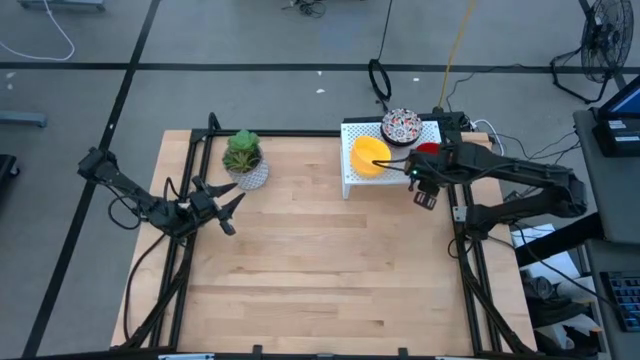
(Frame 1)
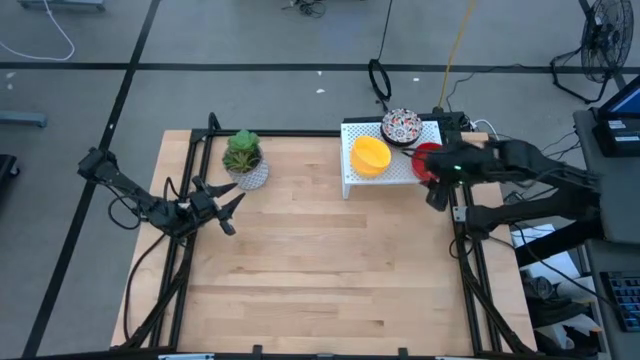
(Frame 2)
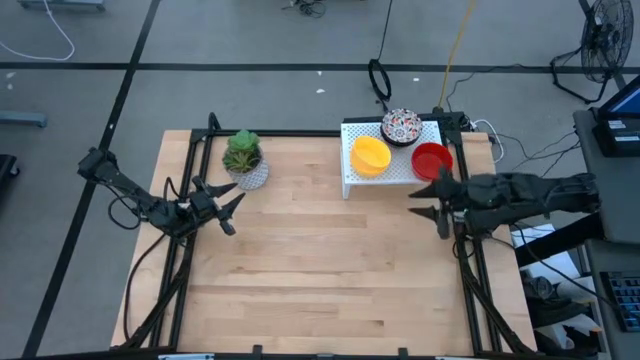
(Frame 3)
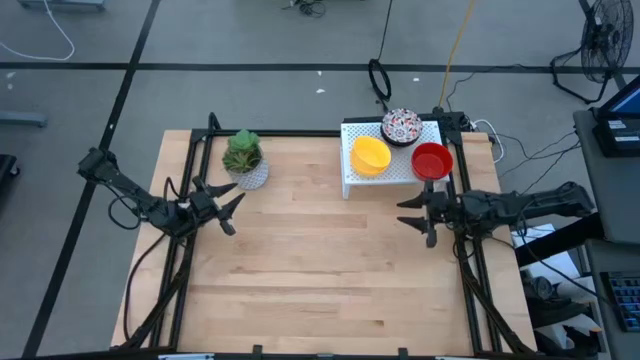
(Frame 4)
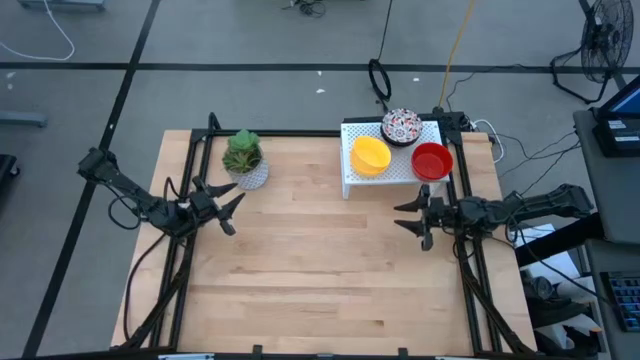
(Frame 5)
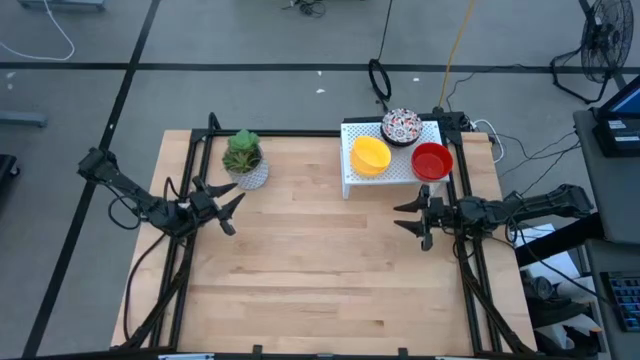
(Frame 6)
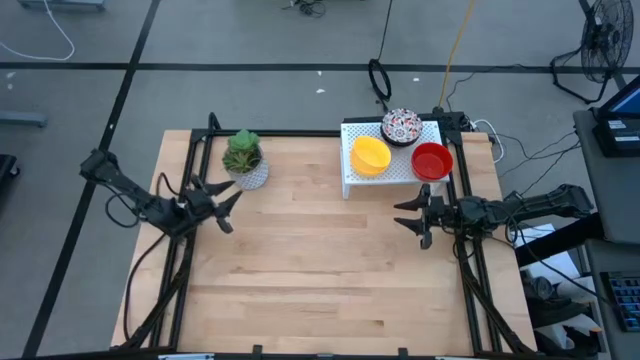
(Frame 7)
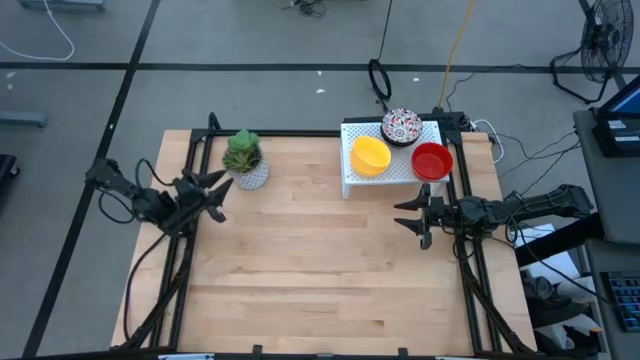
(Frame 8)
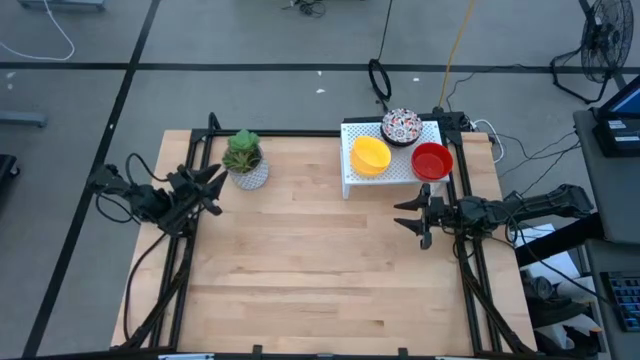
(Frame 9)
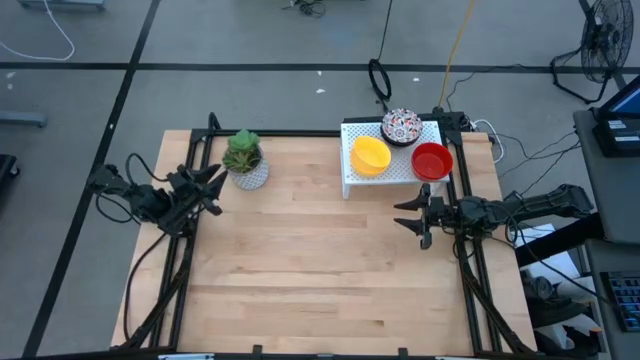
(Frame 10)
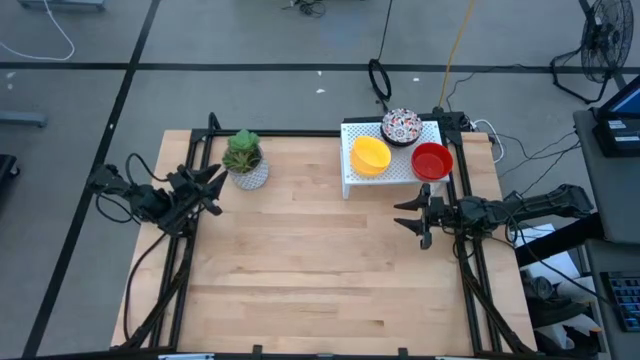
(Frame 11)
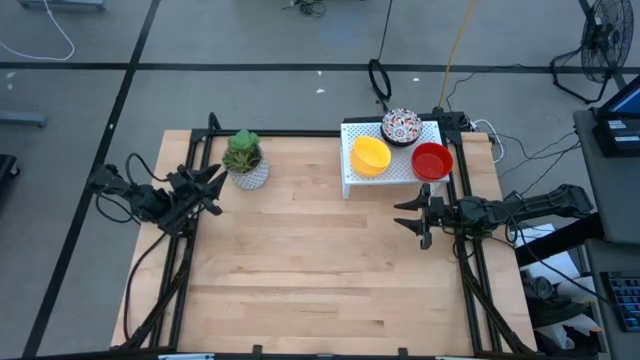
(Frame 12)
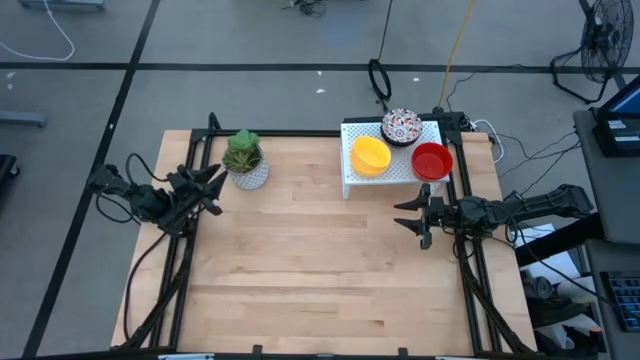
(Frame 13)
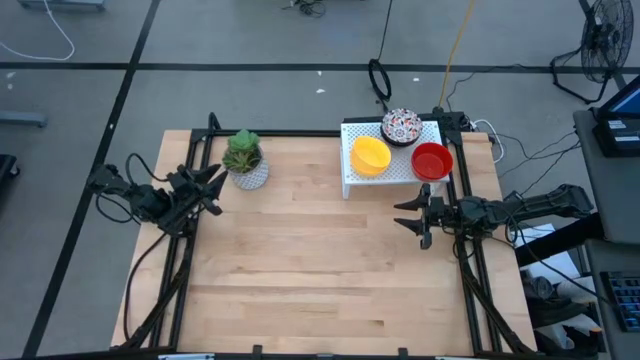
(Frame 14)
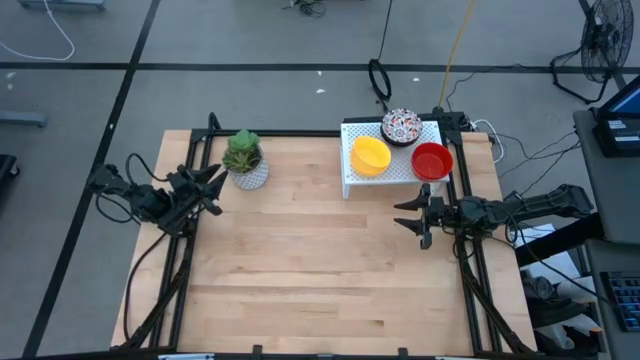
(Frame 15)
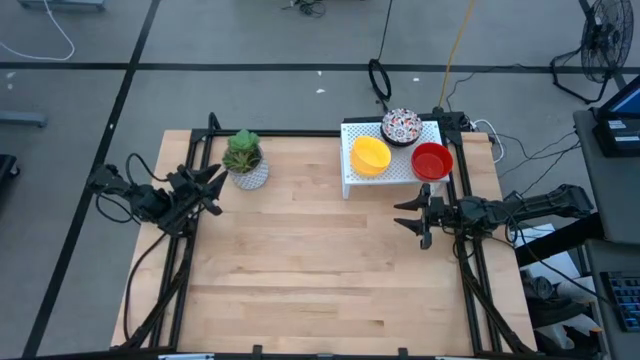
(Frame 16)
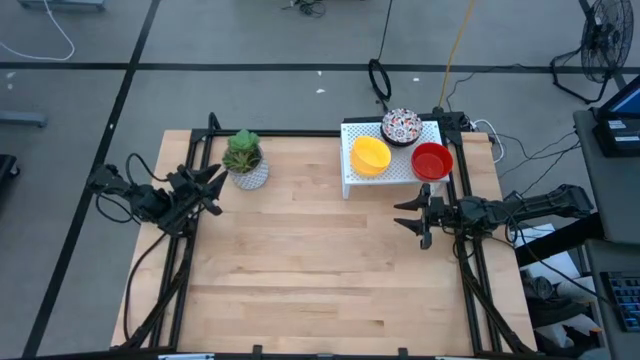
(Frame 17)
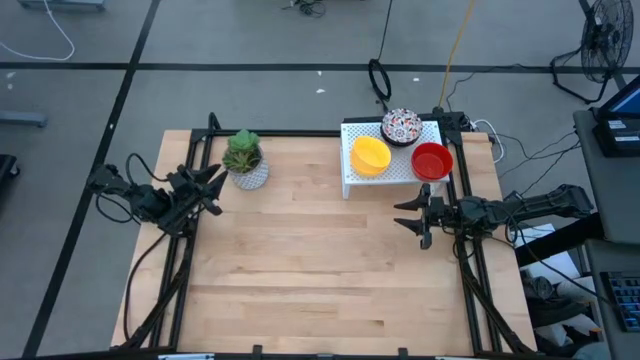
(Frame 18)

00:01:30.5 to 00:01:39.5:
Task: Pick & Place Mini bowls
Return to Home Position

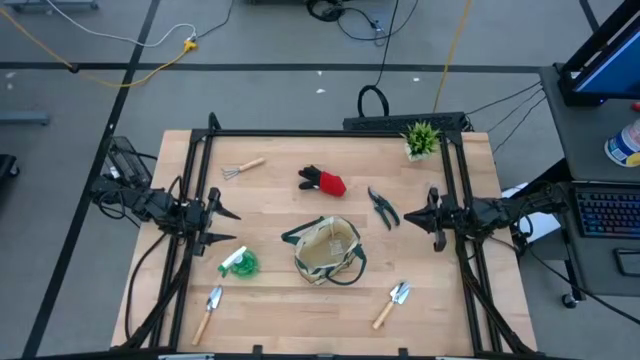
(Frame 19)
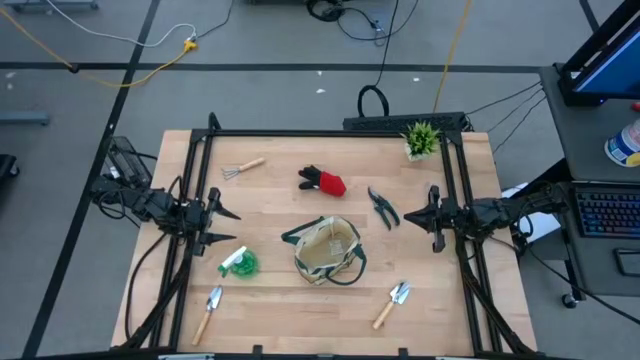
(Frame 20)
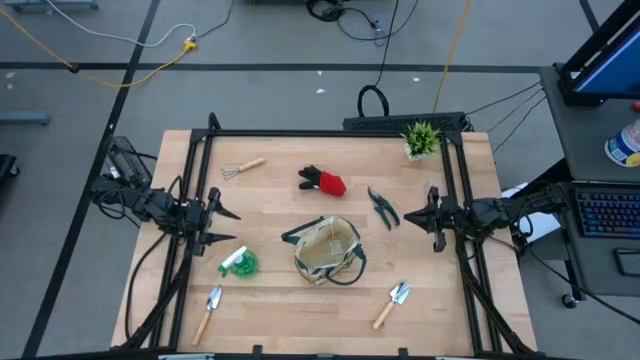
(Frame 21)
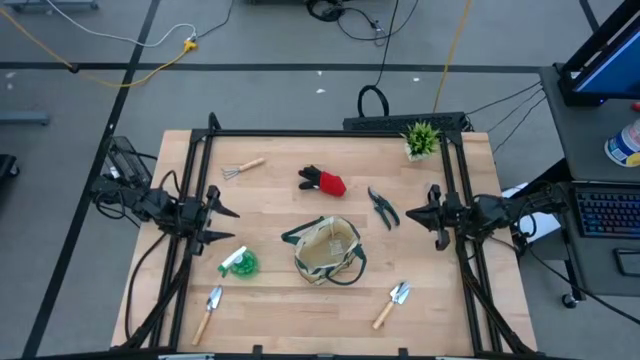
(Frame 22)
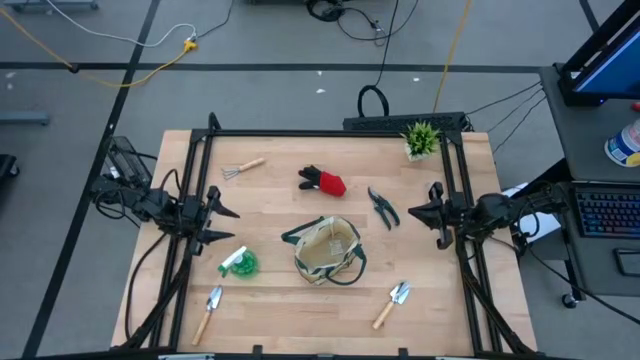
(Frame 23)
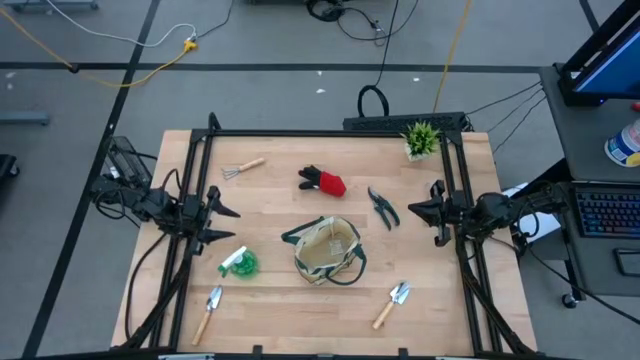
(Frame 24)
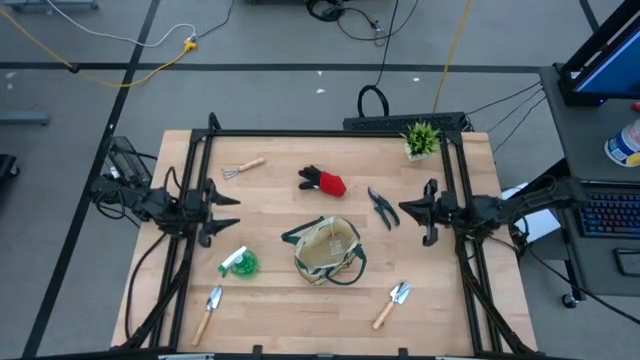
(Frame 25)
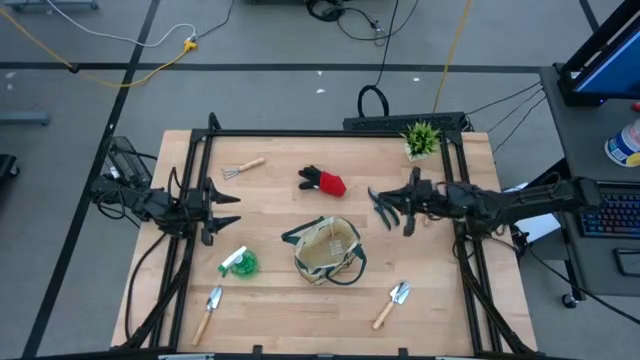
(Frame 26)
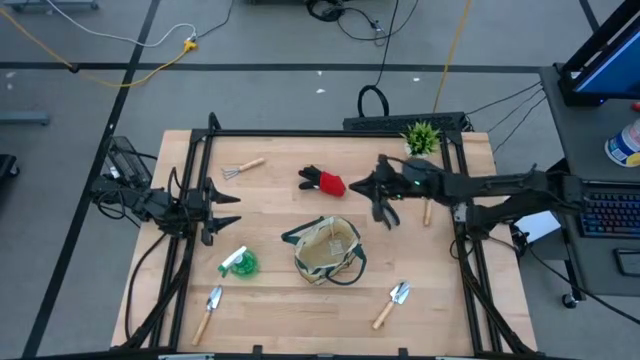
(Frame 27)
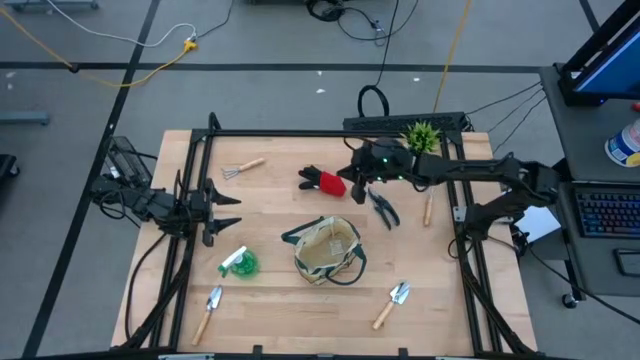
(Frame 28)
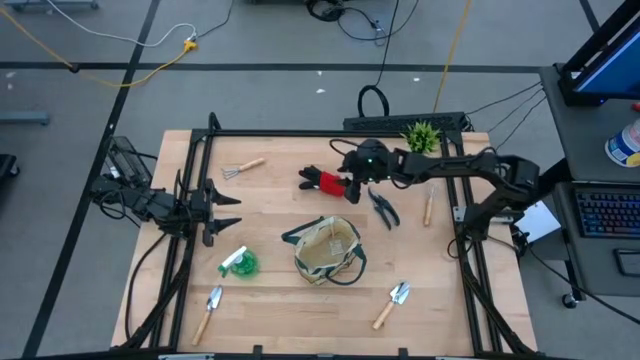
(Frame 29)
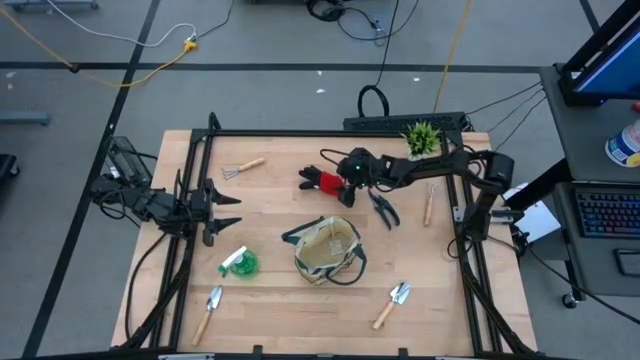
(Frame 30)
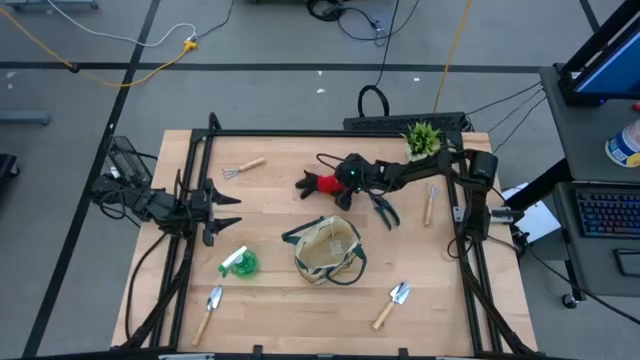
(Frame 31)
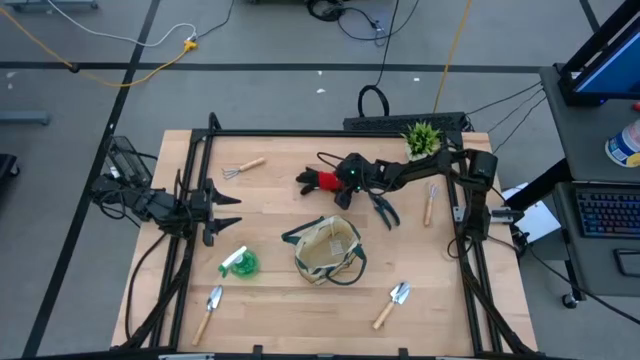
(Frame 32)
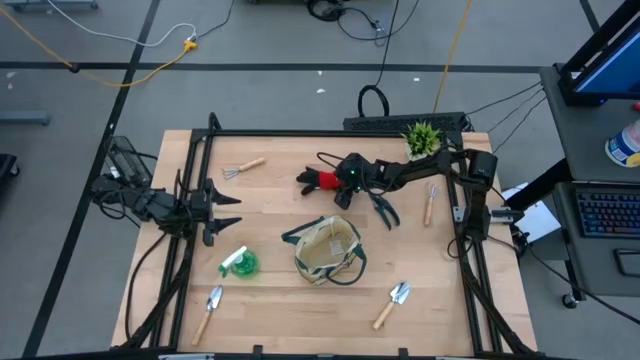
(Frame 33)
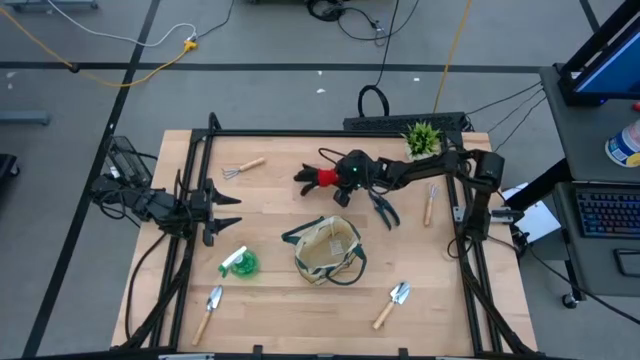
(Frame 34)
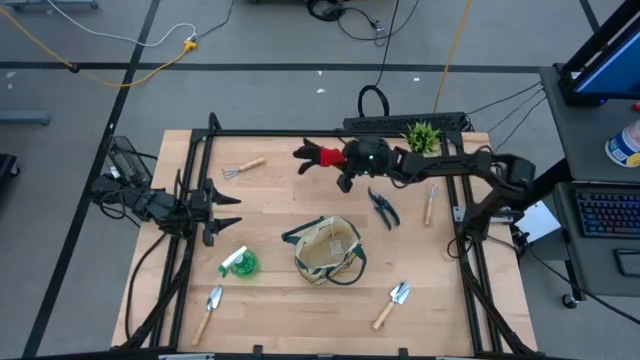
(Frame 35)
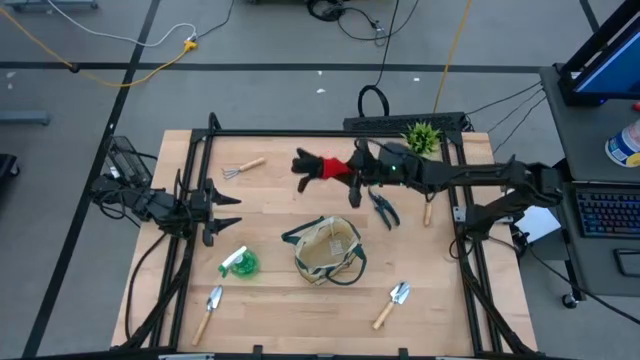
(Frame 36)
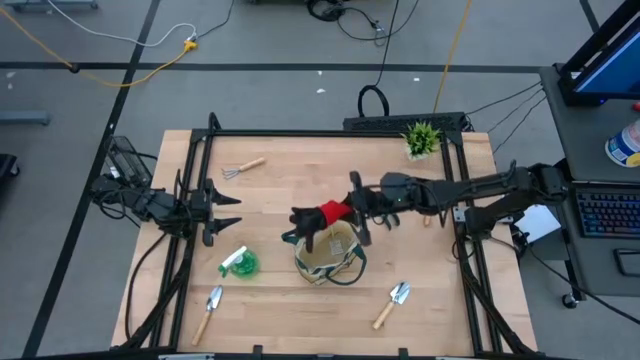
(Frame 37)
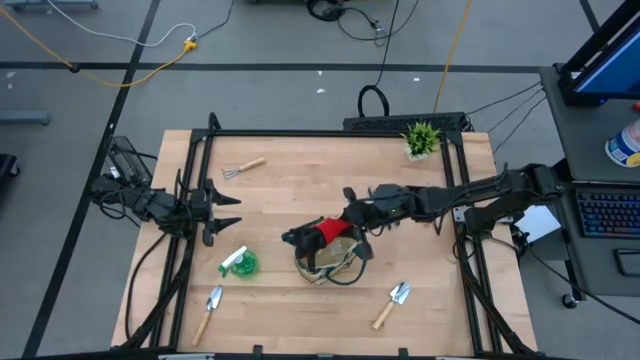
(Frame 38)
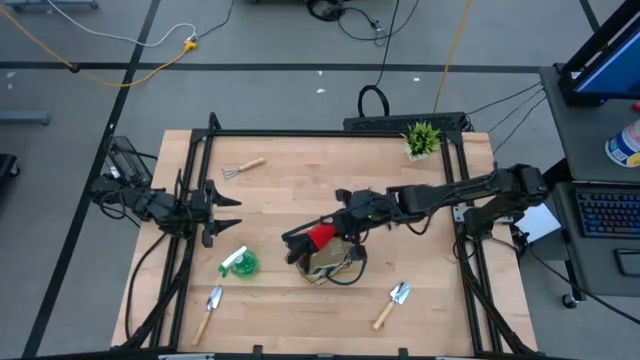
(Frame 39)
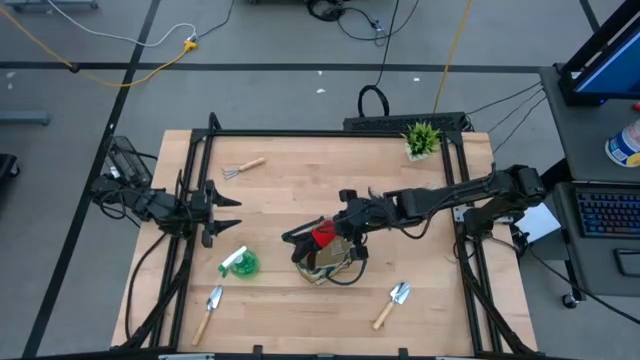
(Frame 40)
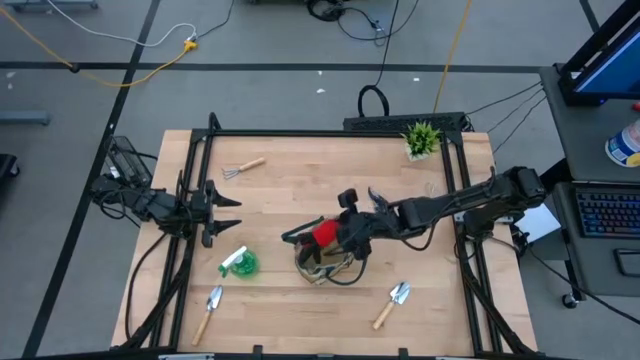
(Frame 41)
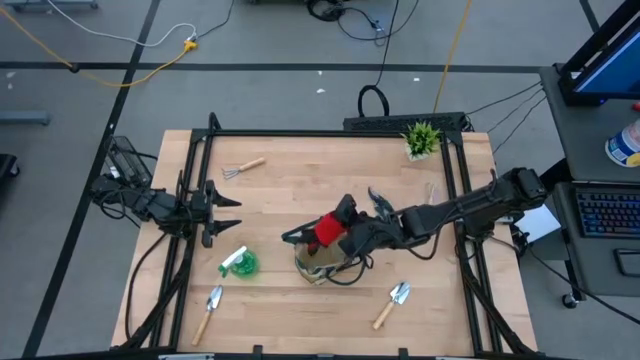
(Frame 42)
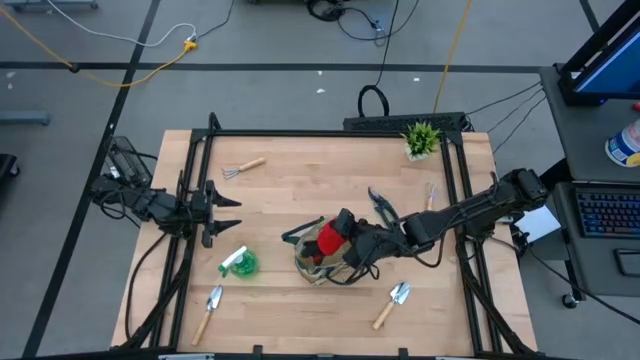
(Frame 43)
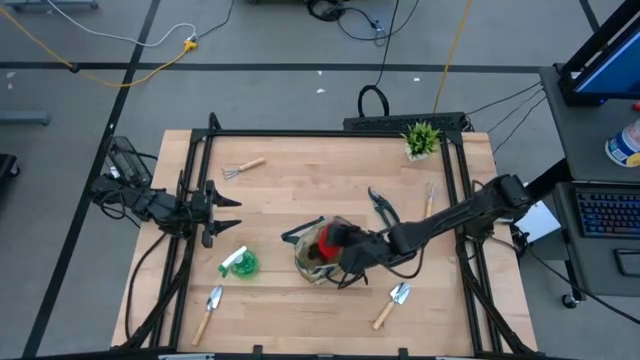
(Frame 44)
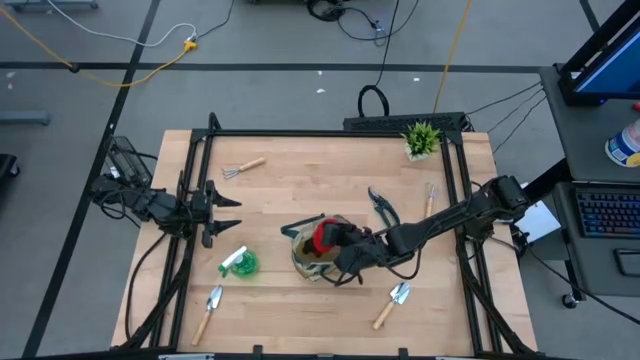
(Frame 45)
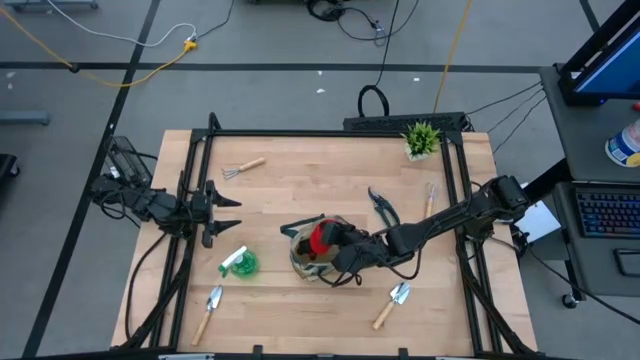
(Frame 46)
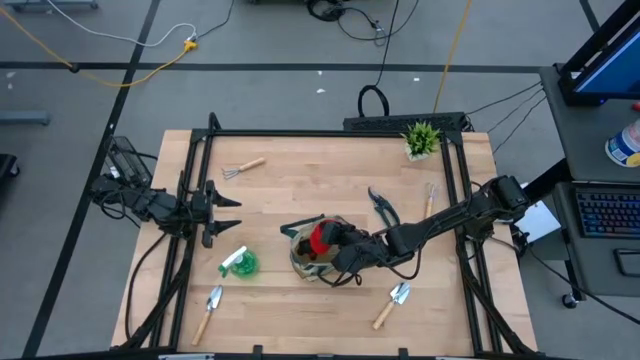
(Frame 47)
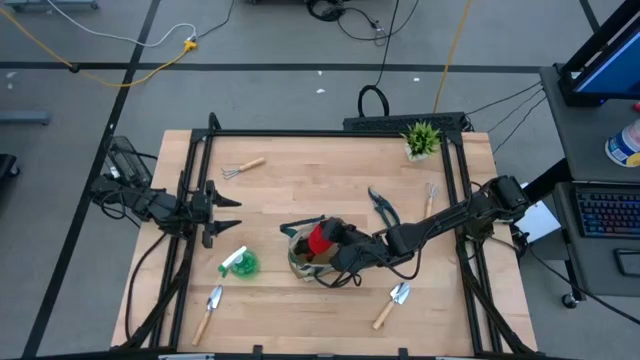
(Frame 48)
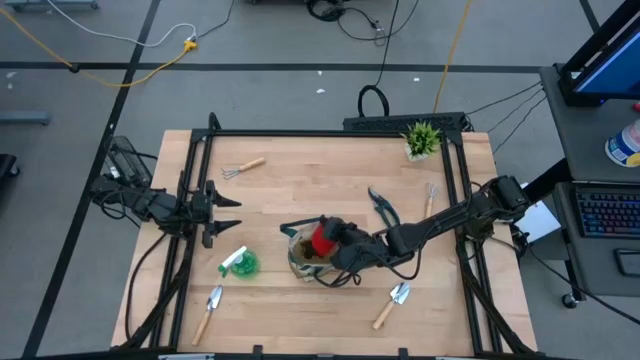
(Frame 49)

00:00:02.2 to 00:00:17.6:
Task: Pick & Place Garden tools in Gardening bag
Put the red gloves into the gardening bag
